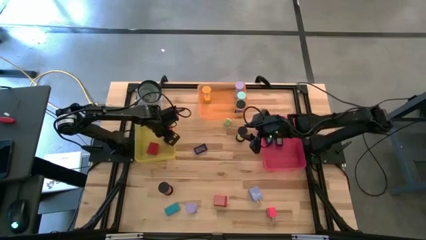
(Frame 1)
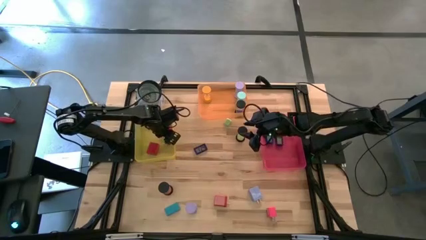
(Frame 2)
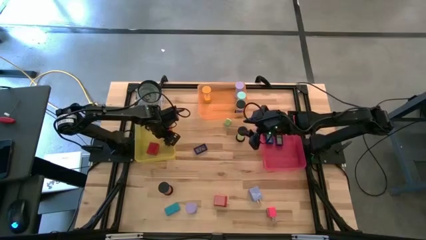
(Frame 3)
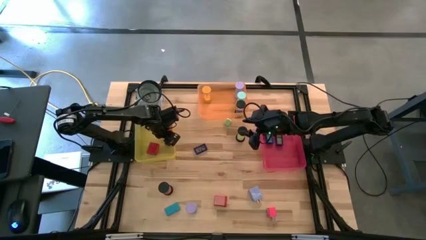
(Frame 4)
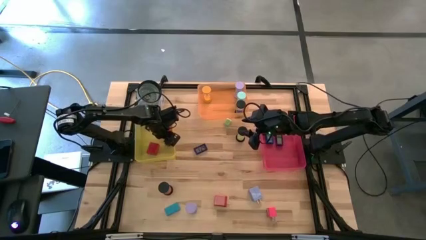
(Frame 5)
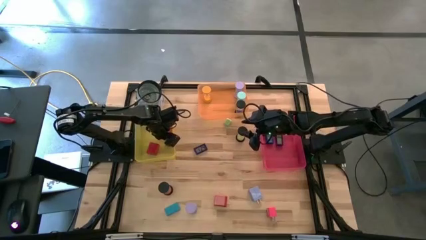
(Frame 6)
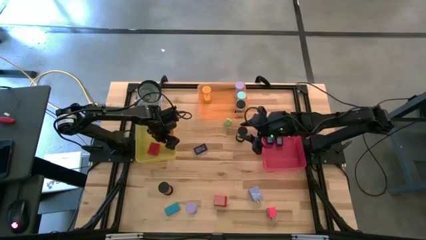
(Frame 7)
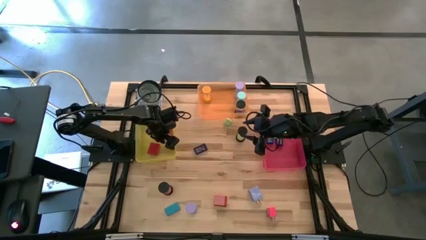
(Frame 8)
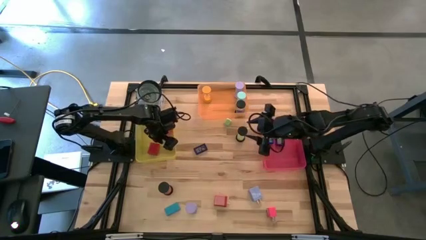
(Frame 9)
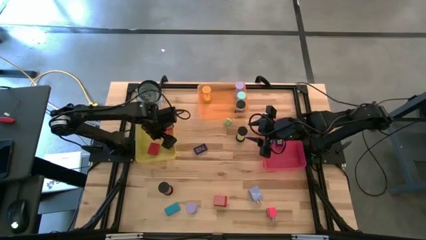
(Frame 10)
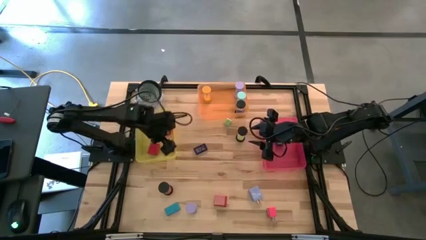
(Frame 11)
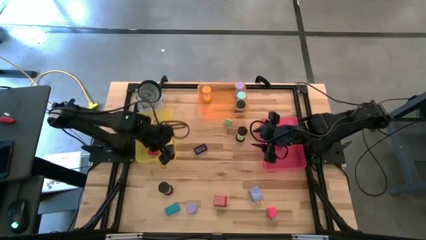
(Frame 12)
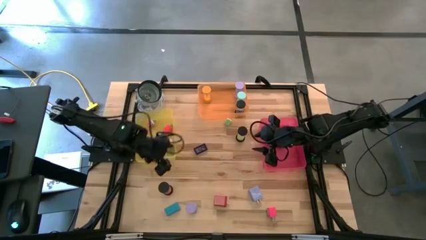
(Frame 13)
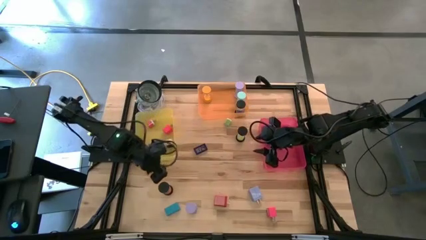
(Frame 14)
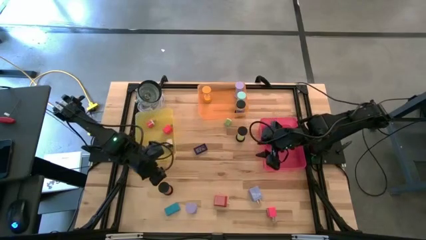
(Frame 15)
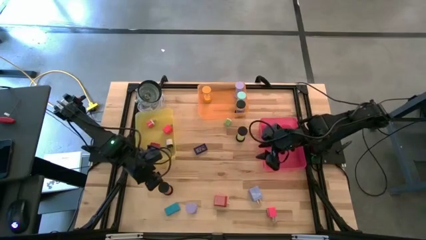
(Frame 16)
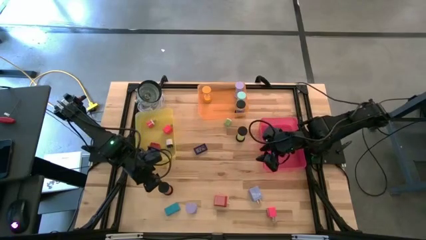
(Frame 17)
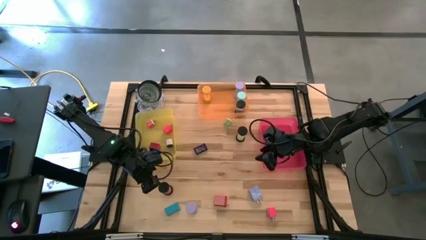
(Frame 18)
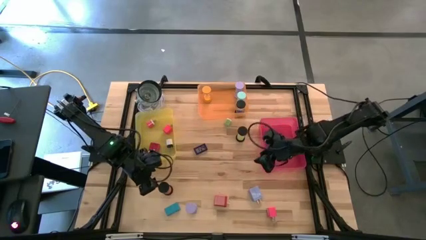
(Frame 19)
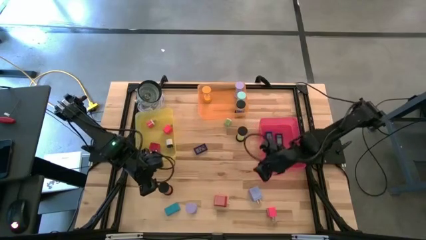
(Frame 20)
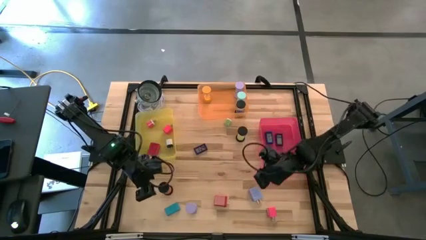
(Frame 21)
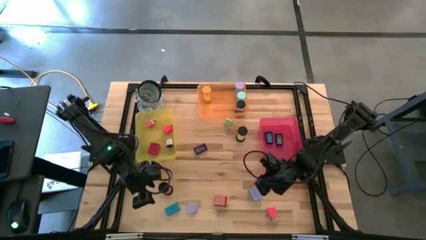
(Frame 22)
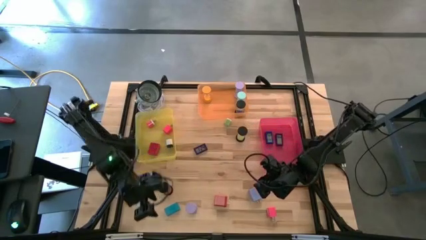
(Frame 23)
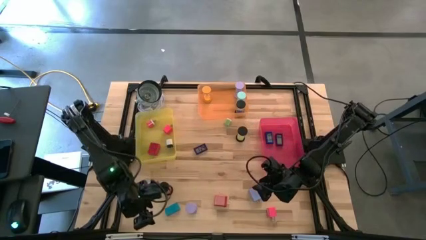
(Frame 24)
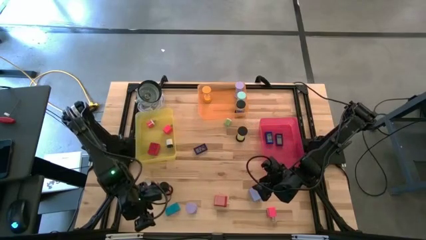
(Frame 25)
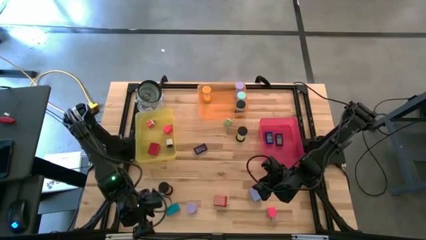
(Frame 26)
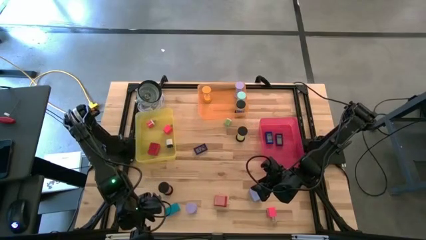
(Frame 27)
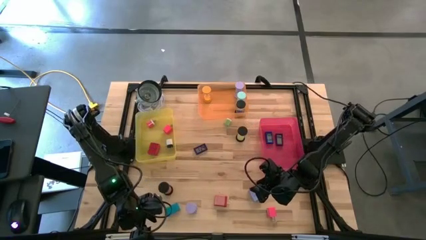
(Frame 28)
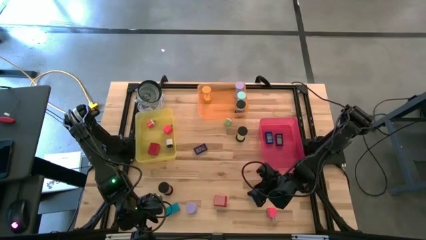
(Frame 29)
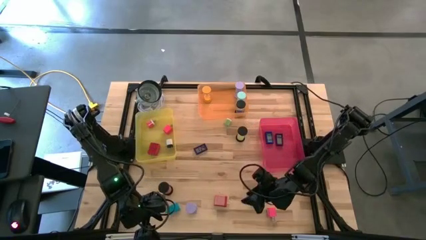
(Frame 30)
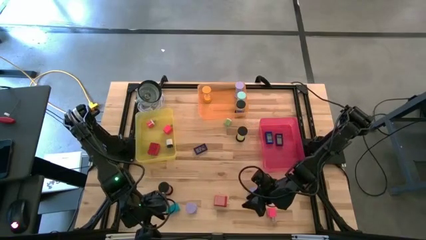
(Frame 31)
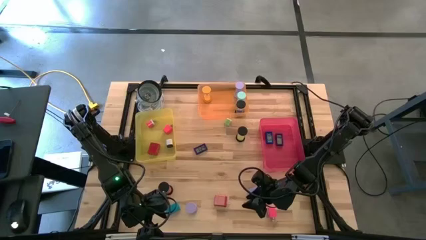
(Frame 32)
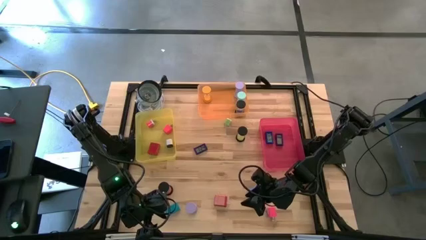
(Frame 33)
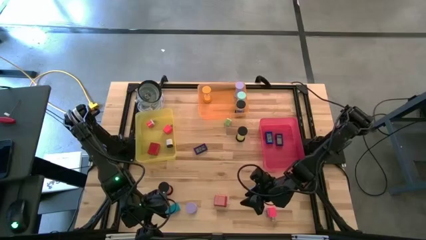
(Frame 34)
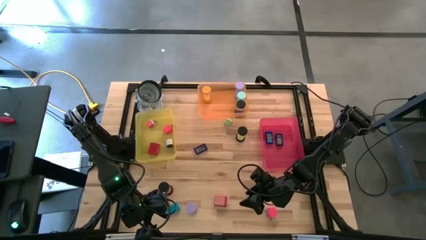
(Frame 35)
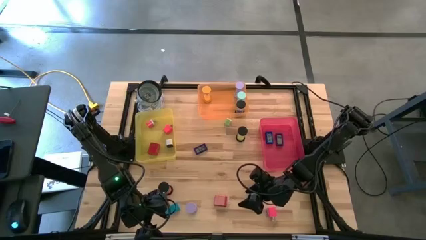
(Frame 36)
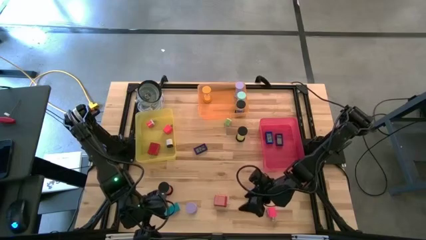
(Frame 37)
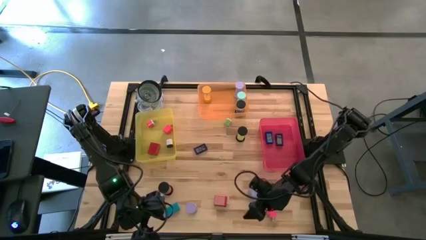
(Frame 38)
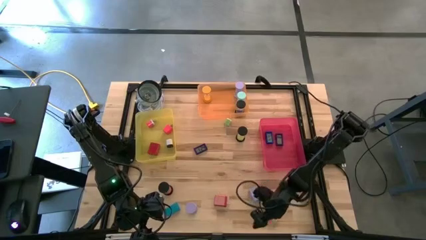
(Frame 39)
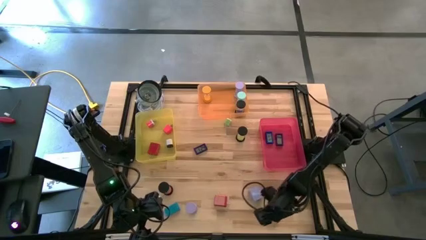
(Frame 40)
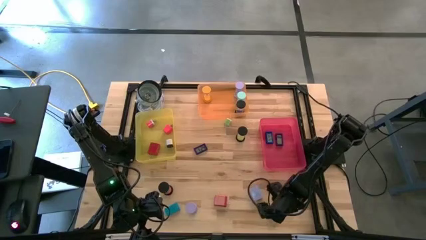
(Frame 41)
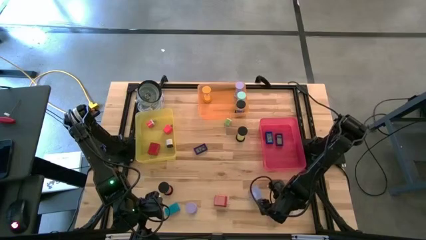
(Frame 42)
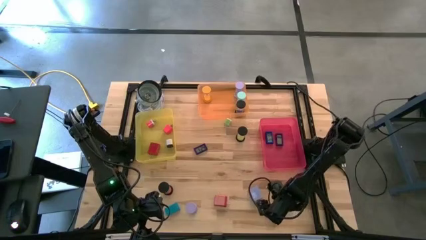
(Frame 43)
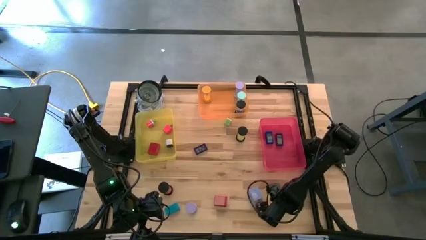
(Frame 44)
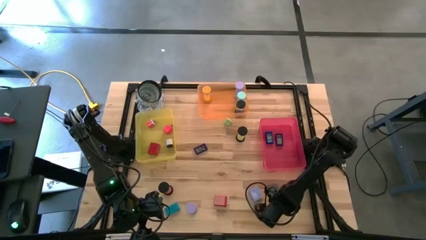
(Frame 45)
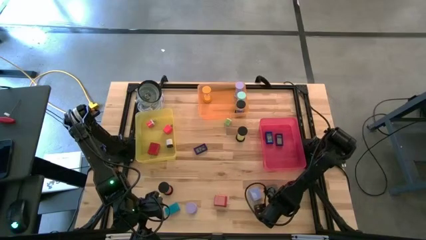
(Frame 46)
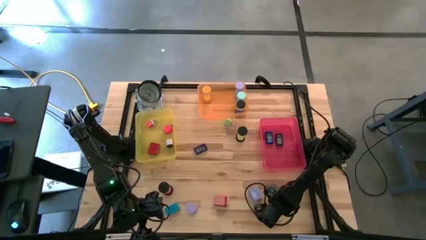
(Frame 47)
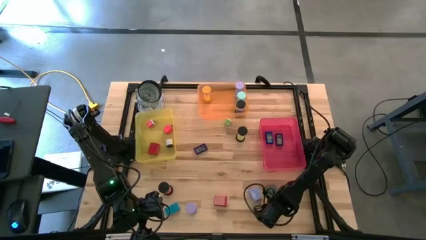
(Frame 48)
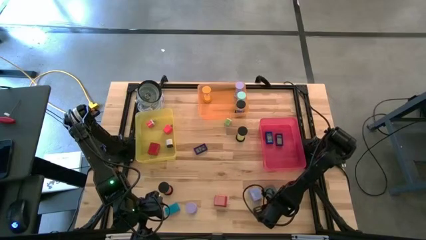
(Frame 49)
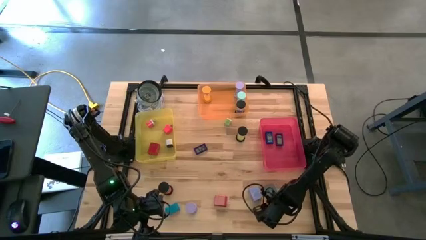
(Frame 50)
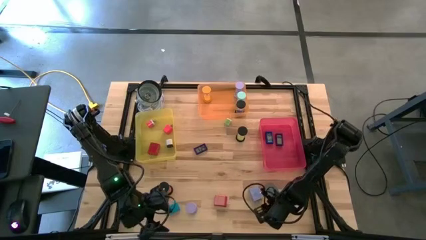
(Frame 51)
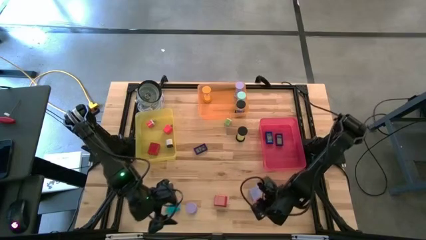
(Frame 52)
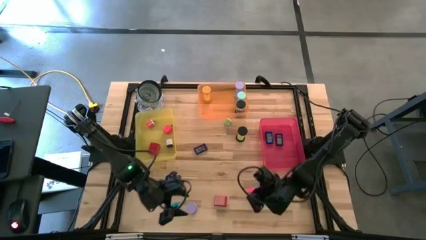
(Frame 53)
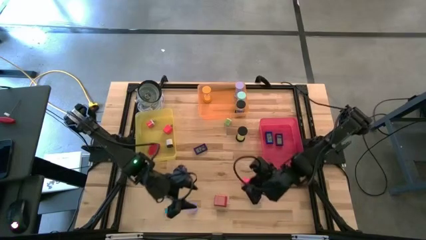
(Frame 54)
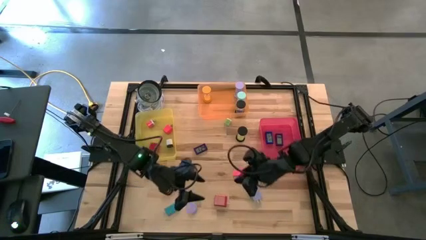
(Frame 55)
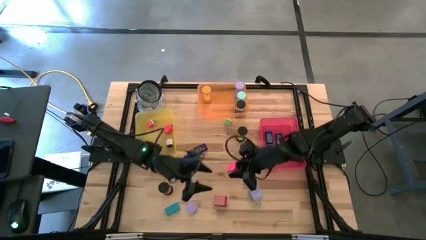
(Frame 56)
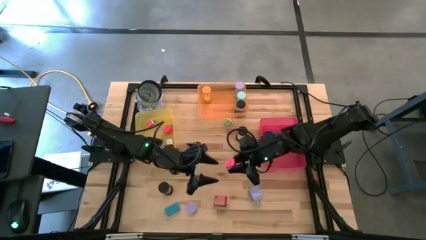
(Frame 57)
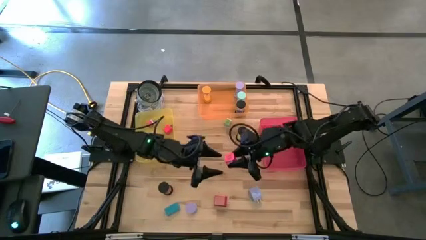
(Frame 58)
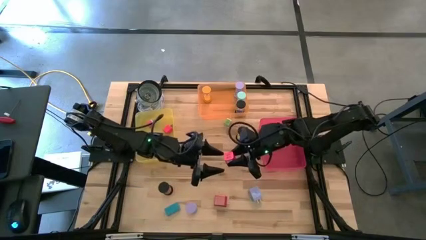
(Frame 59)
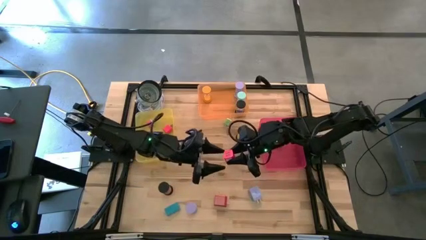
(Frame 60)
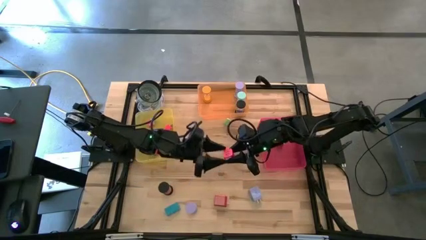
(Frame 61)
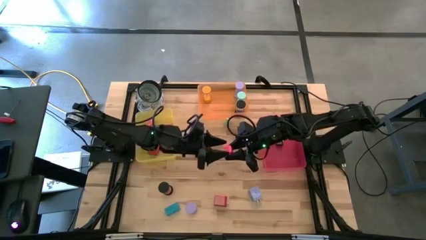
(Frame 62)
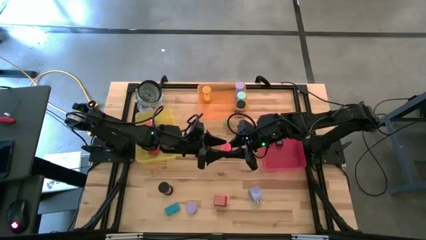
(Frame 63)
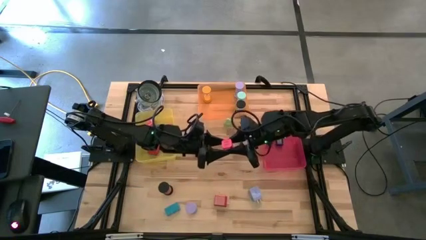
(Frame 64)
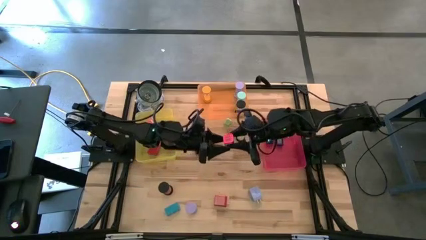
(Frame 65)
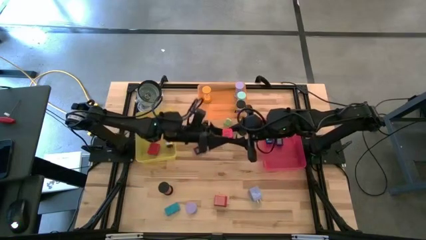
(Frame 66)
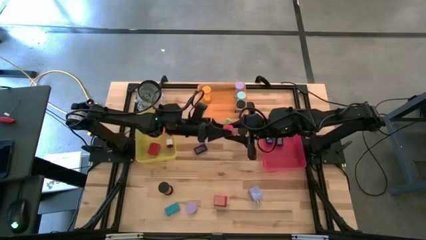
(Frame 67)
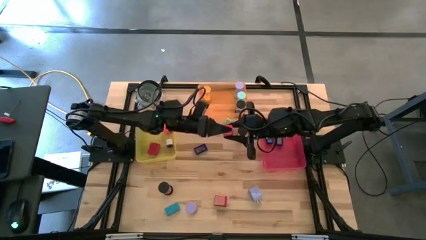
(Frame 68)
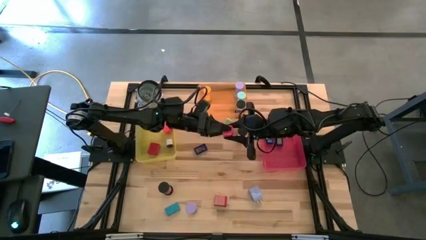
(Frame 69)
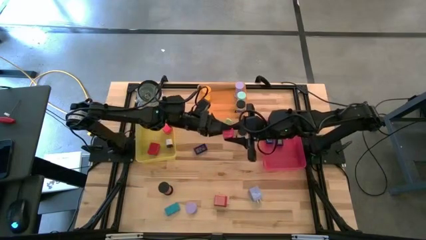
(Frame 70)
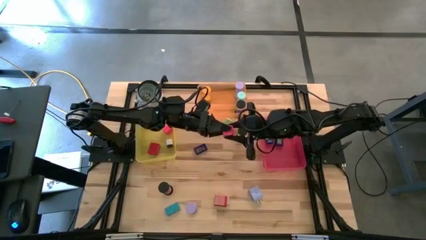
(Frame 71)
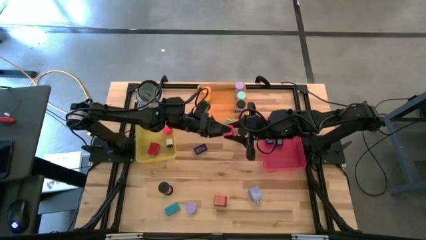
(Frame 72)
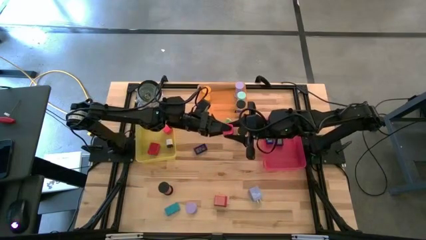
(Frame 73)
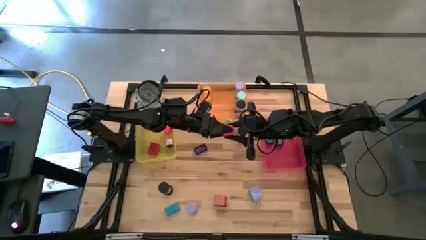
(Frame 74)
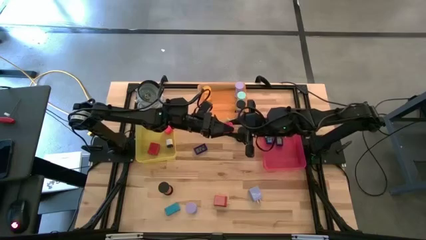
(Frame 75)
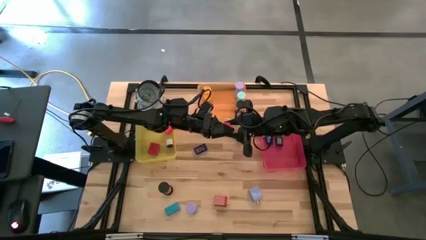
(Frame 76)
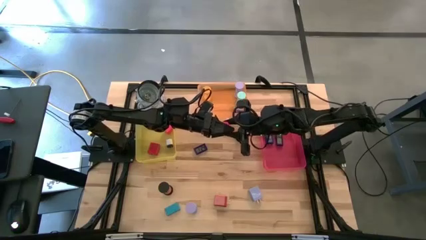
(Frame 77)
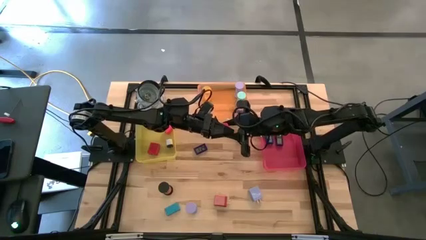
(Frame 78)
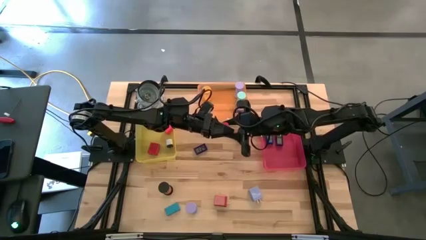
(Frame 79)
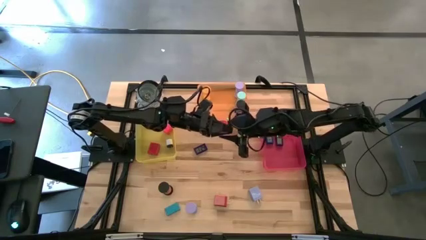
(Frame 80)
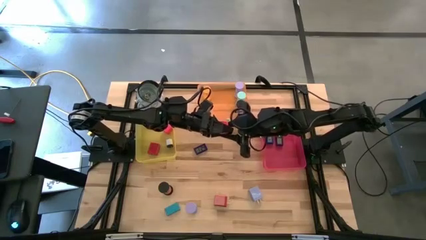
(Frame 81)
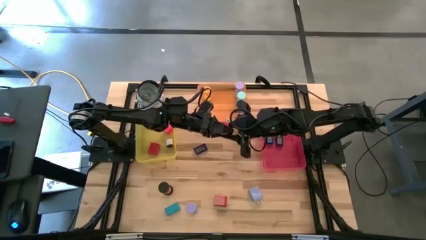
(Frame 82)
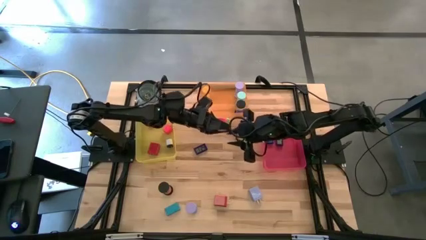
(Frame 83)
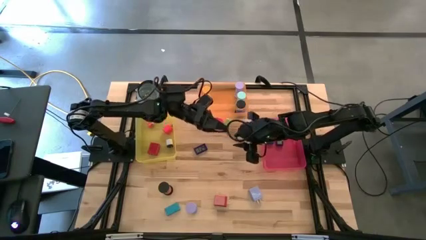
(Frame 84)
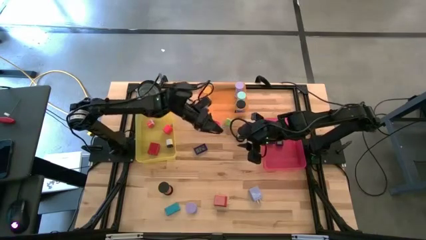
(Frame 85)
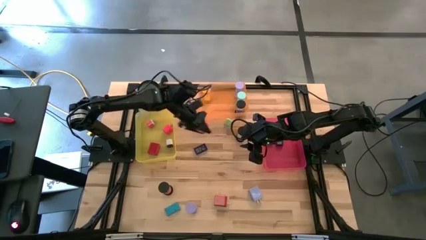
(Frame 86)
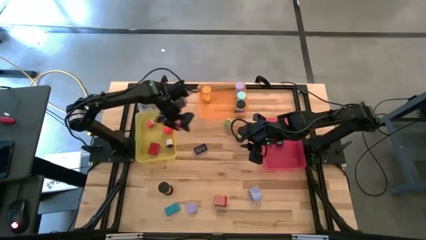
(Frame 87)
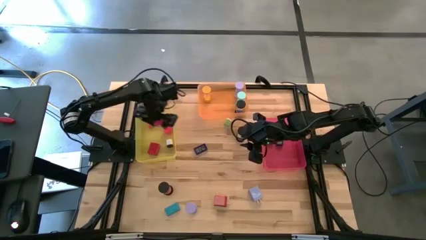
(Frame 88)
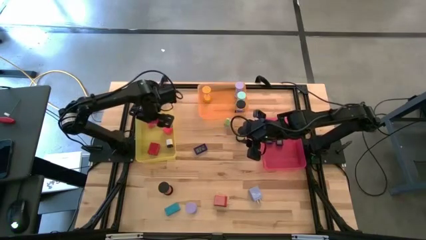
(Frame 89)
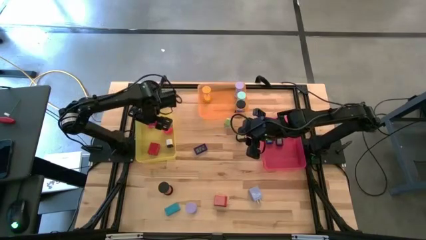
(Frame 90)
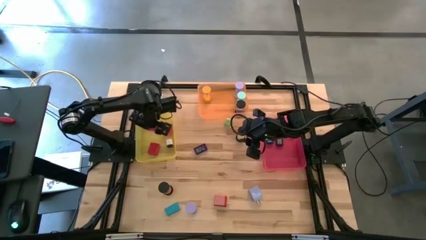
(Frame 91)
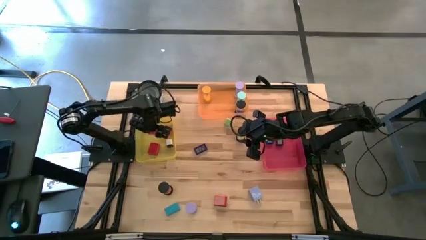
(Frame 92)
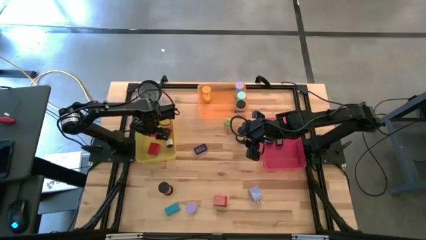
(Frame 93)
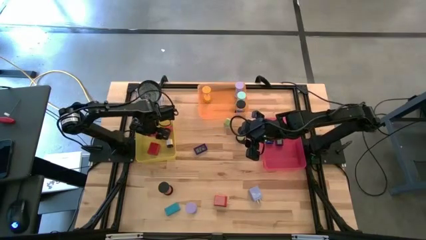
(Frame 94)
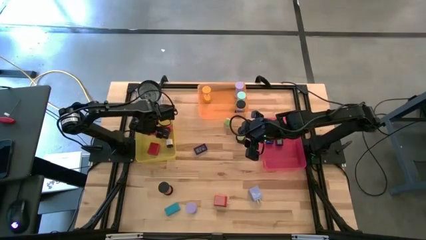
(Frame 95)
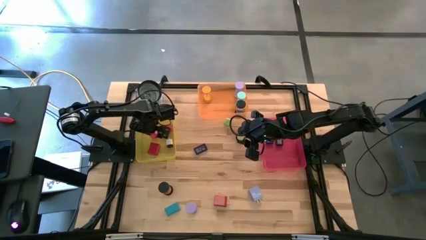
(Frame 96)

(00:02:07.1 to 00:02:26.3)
Task: Pick & Place Office items
Put the red charger in the yellow bin
